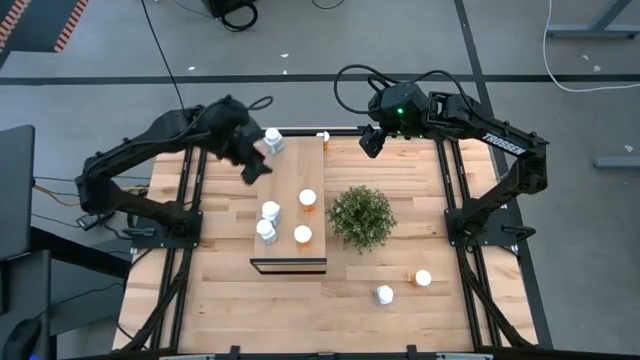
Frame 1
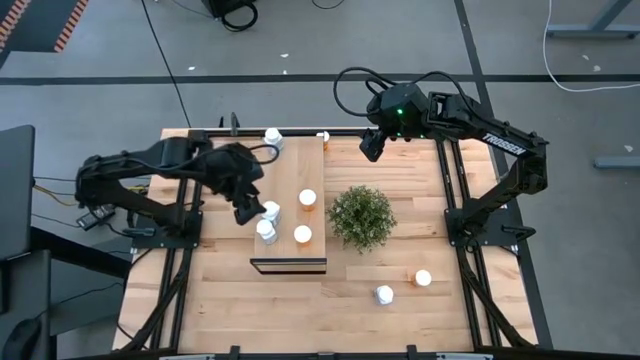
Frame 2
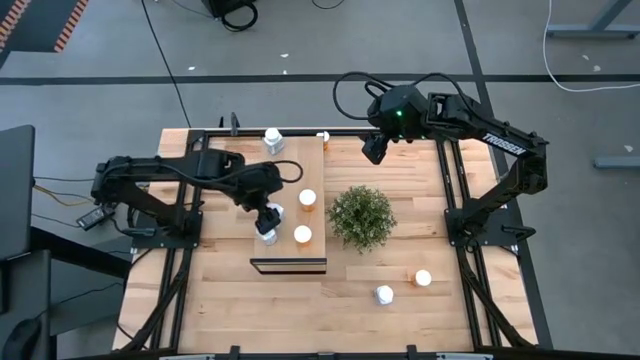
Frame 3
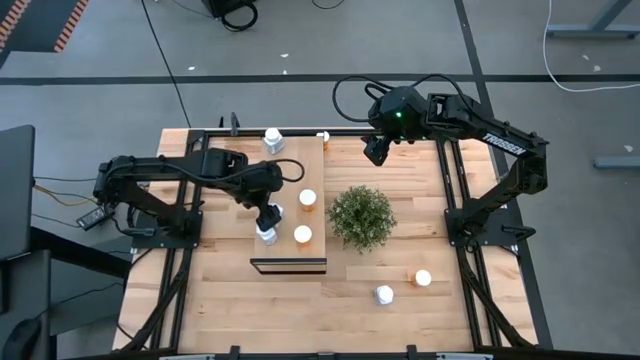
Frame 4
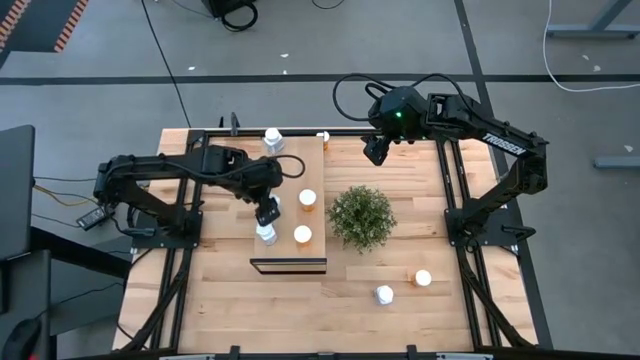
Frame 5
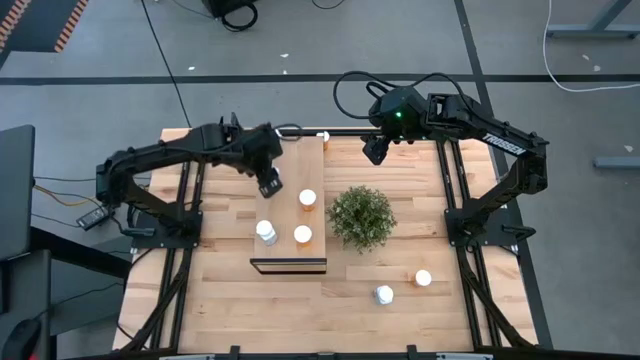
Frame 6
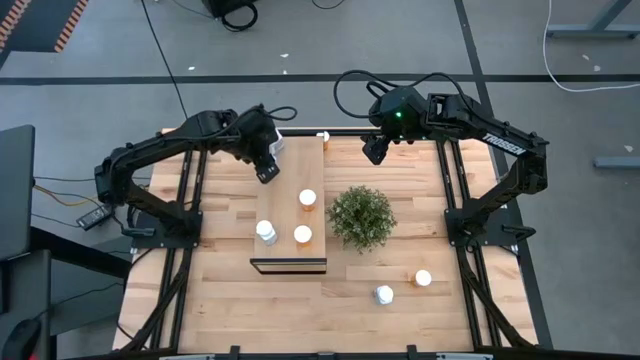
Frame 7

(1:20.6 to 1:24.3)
Task: Pick and place medicine bottles onto shelf by color
Adjust the white pill bottle on the shelf

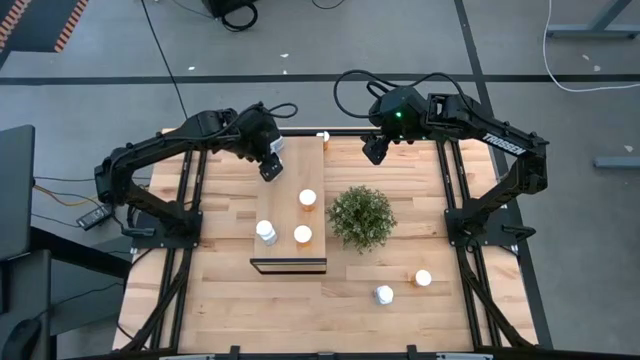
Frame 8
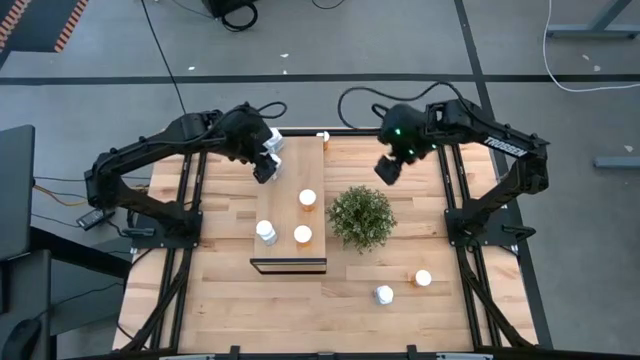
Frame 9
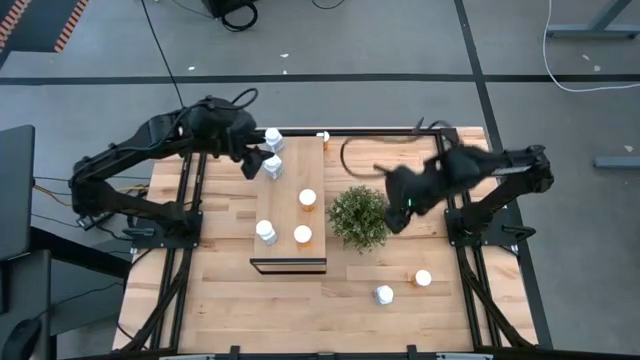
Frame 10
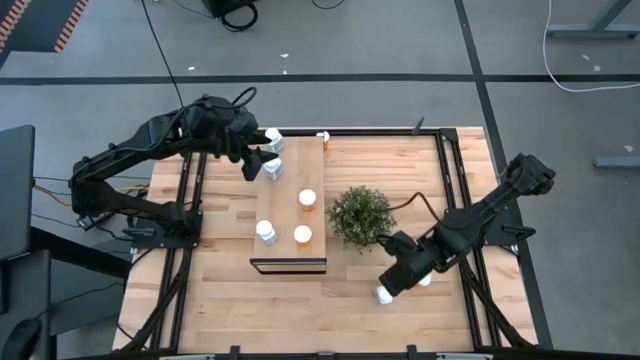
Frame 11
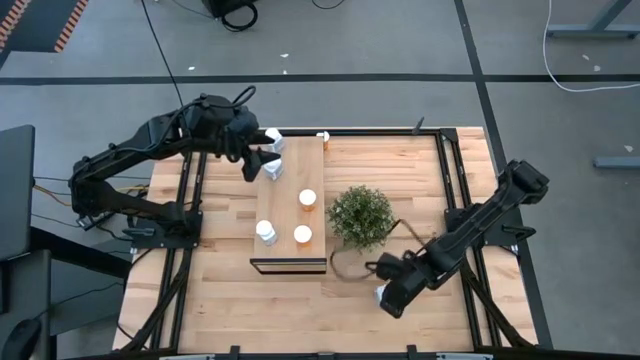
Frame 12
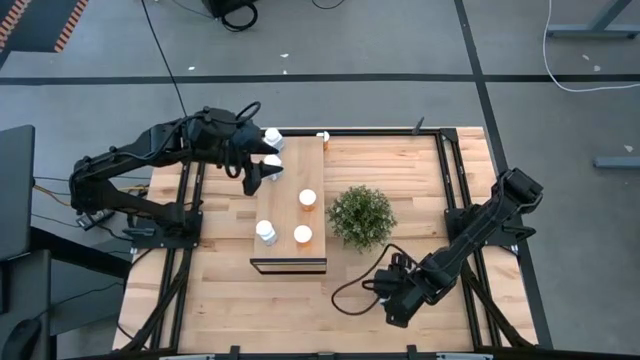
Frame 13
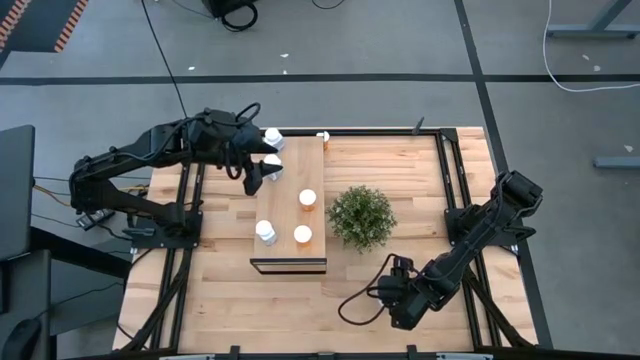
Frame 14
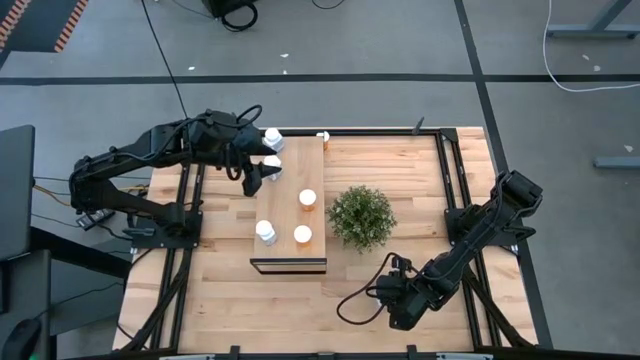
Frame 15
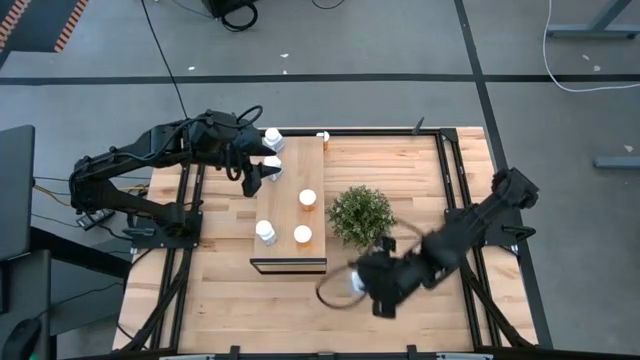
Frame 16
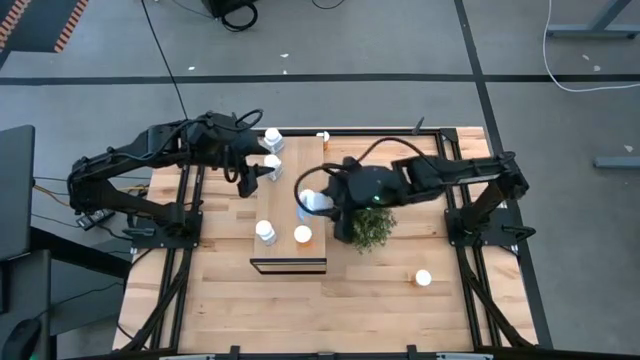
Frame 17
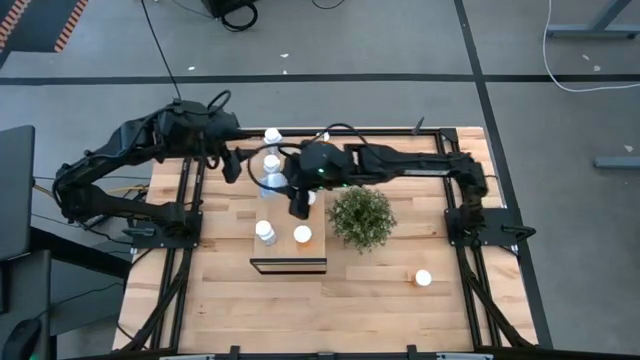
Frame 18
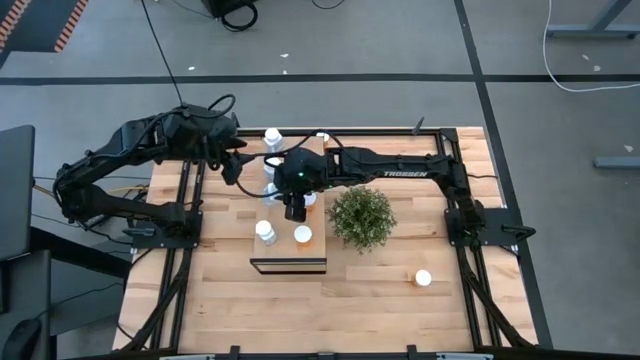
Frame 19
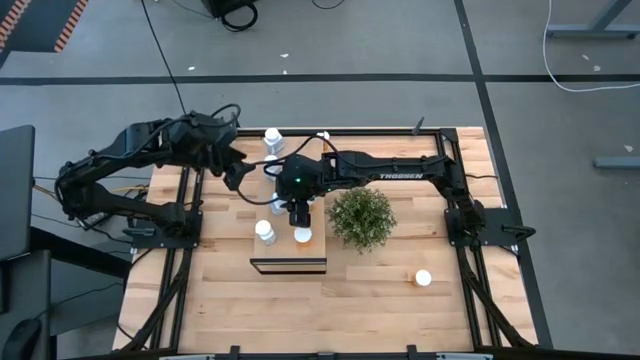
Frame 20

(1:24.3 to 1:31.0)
Put the white pill bottle on the shelf aligned with the other white pill bottles

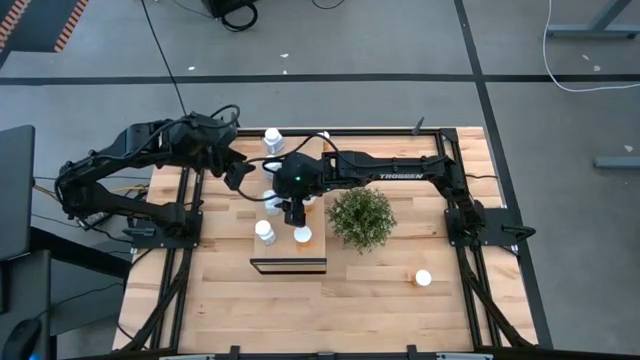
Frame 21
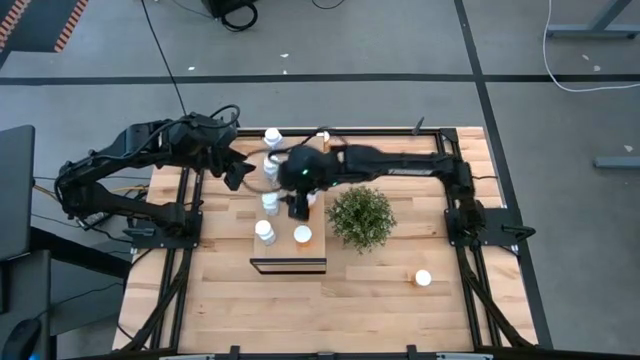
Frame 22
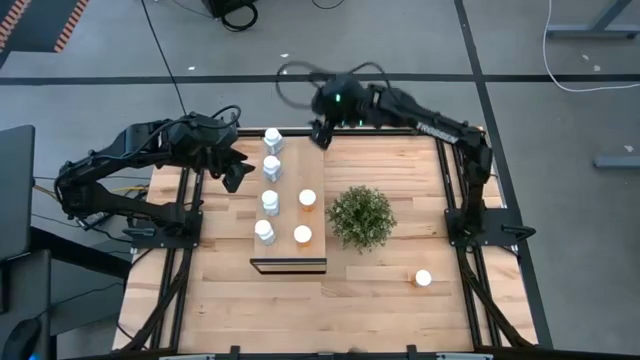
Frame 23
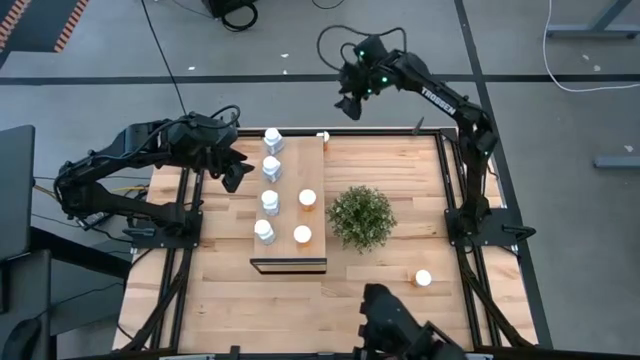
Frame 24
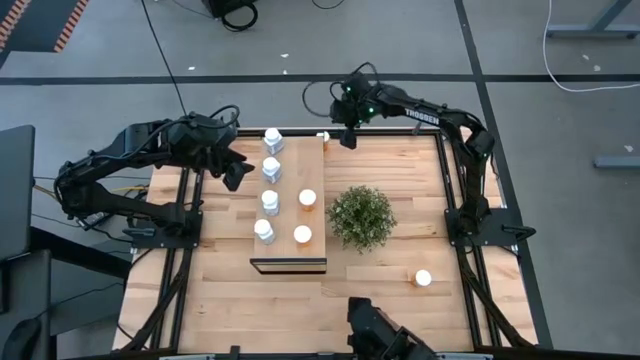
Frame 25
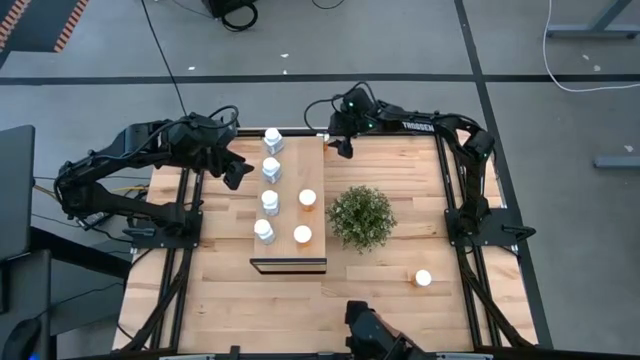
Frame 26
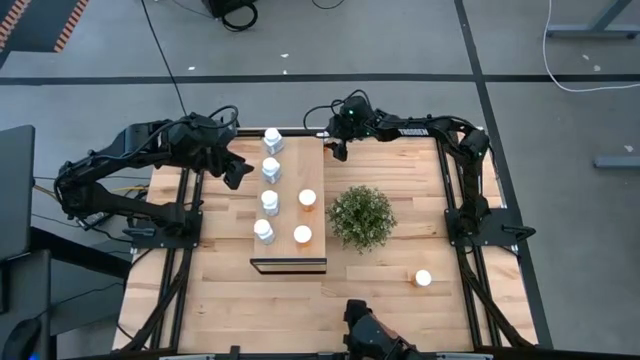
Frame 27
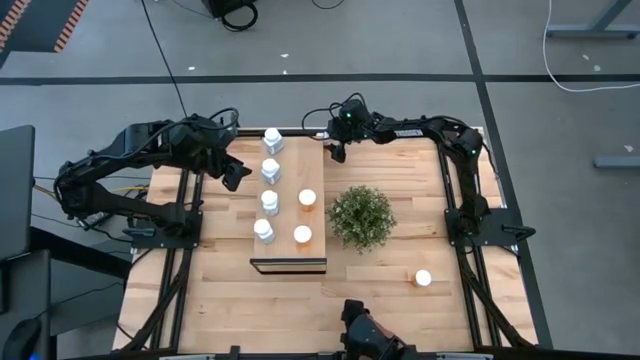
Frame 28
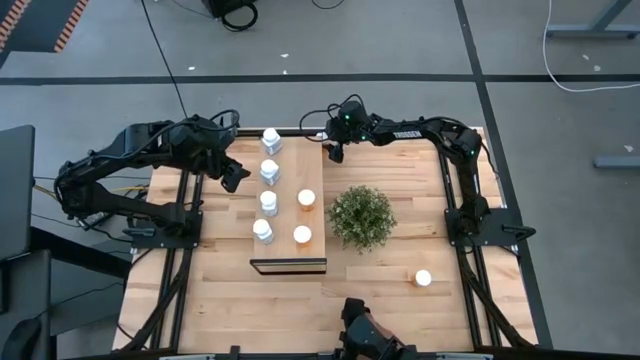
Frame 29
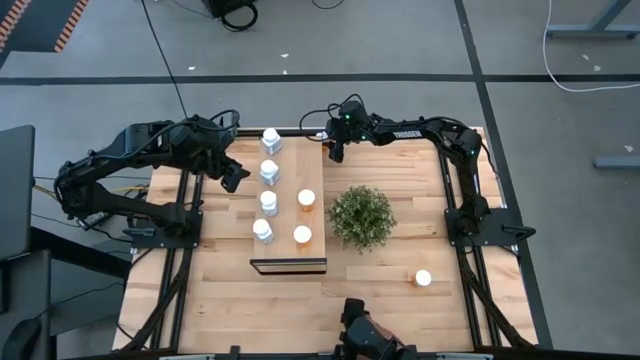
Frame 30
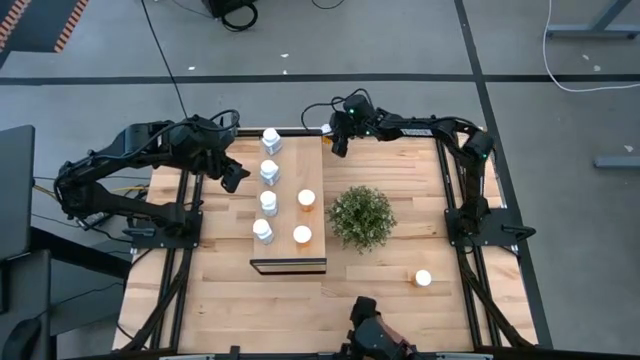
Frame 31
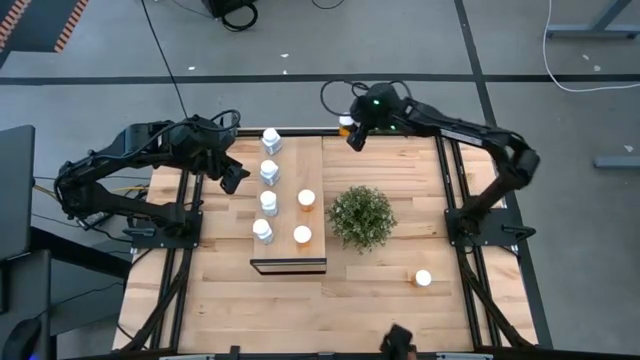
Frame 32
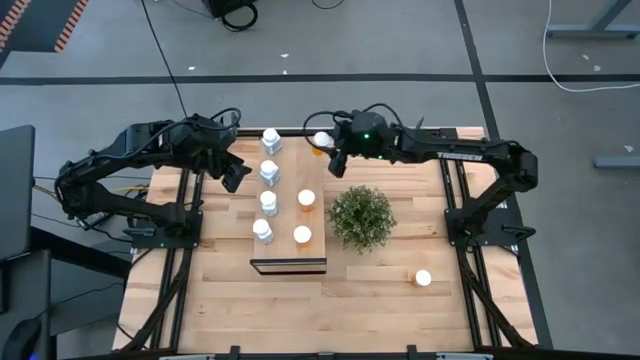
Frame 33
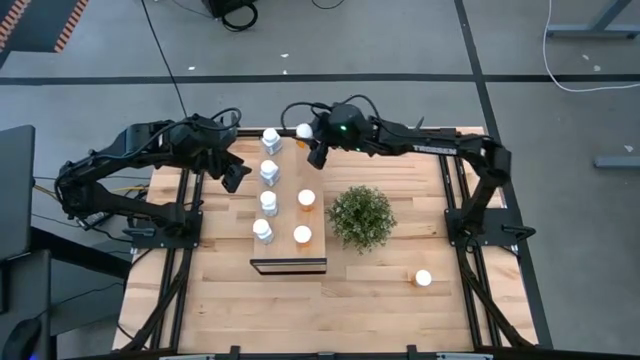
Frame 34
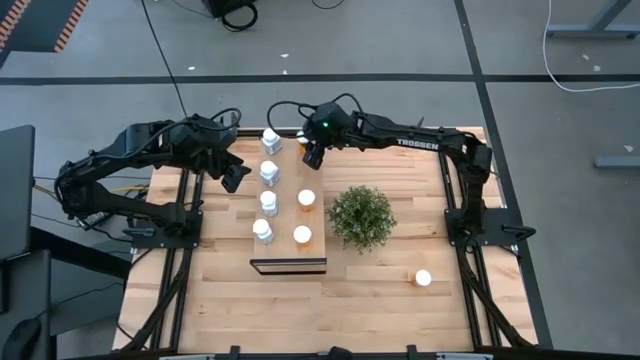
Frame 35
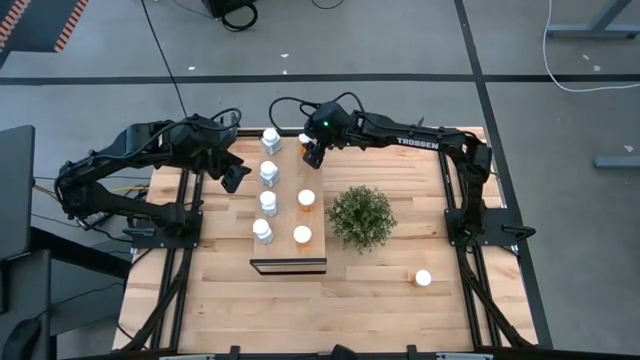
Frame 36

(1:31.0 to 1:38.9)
Put the top orange pill bottle on the shelf aligned with the other orange pill bottles

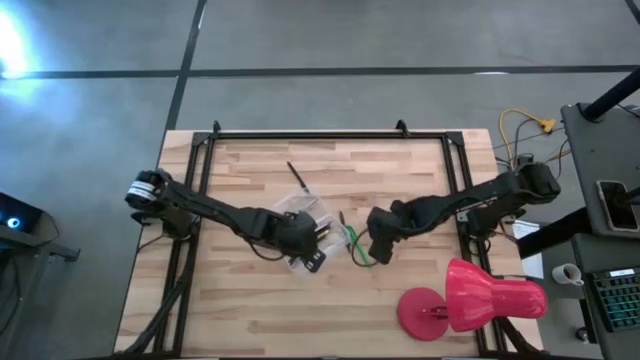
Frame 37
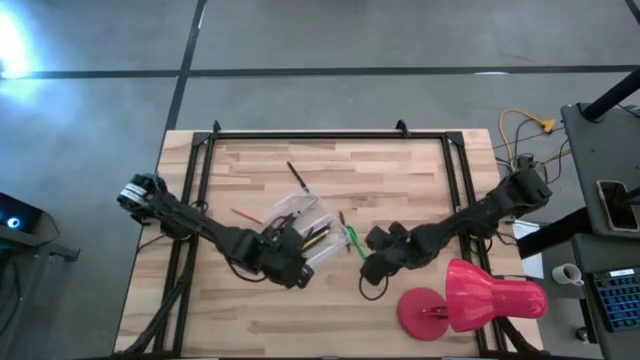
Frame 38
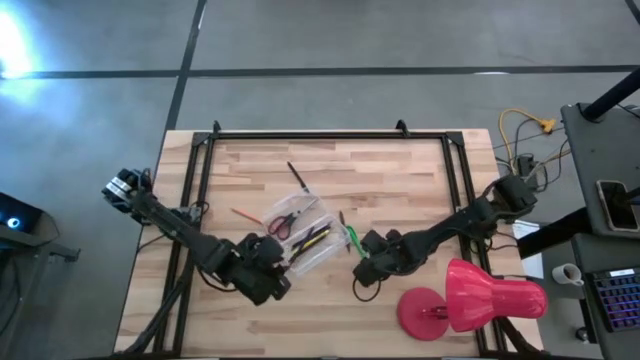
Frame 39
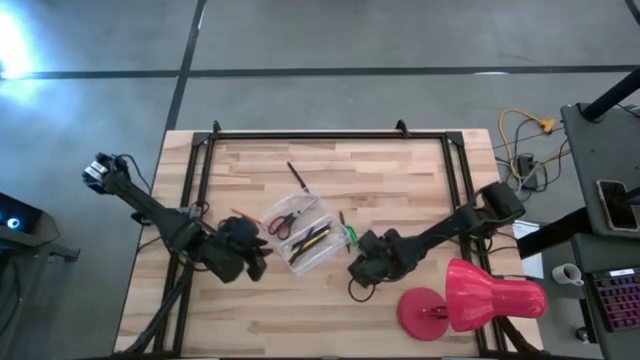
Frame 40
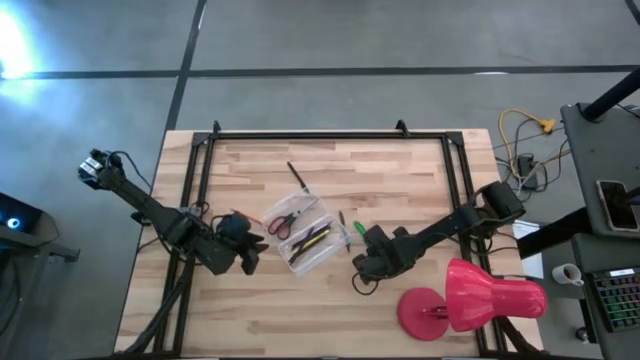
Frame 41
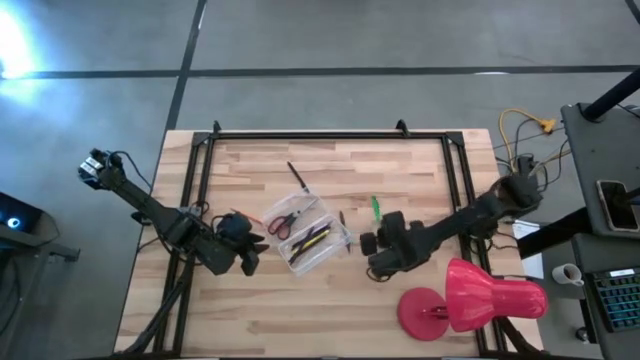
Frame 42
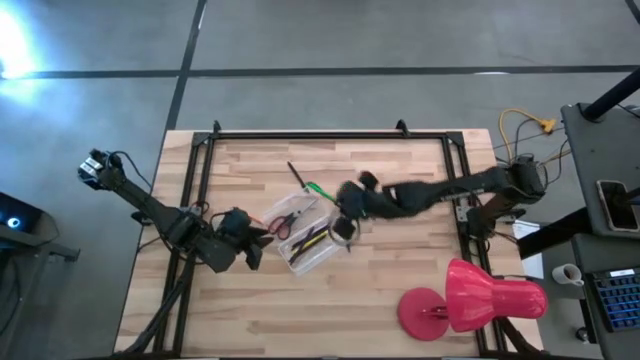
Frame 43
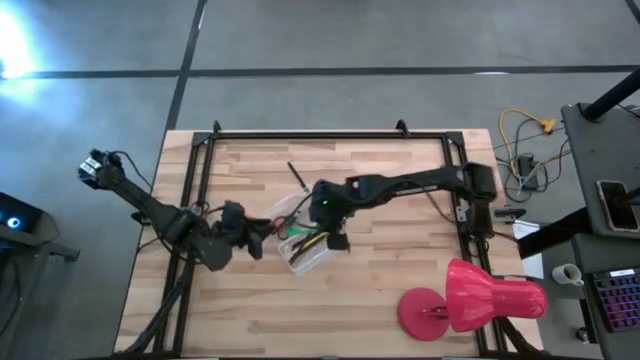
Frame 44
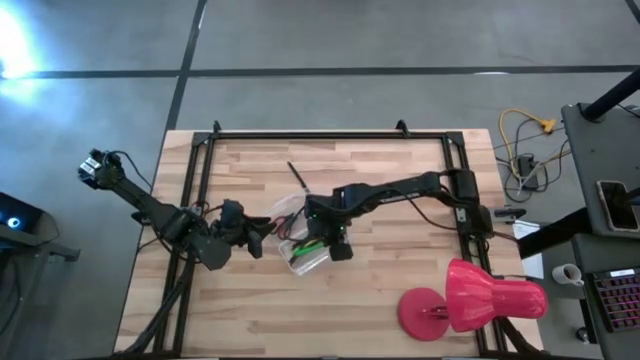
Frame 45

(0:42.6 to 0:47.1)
Task: Pick & place school supplies into a supply box
Put the green pen into the stationery box
